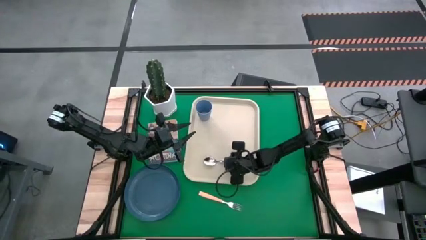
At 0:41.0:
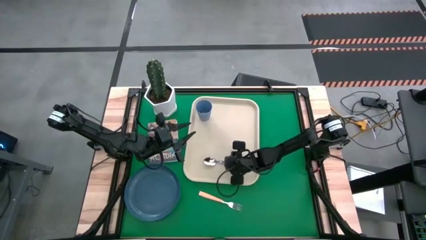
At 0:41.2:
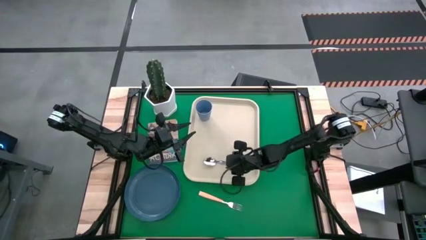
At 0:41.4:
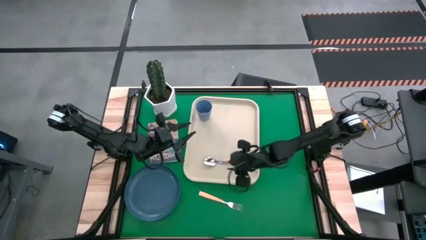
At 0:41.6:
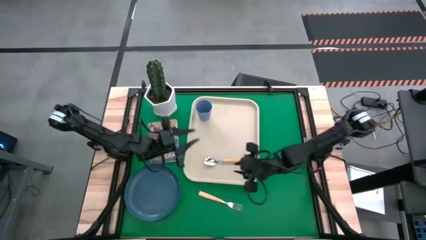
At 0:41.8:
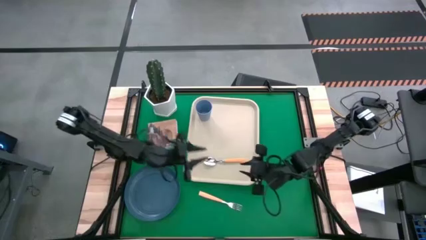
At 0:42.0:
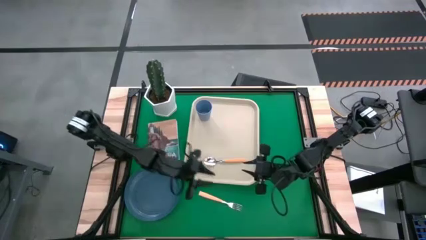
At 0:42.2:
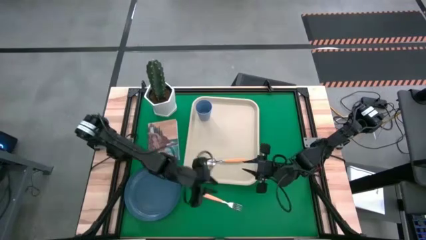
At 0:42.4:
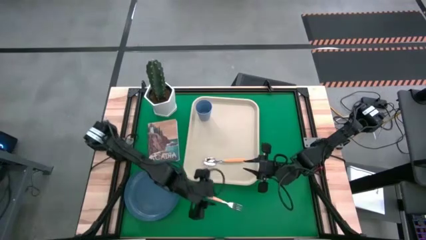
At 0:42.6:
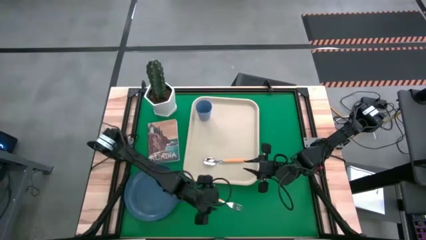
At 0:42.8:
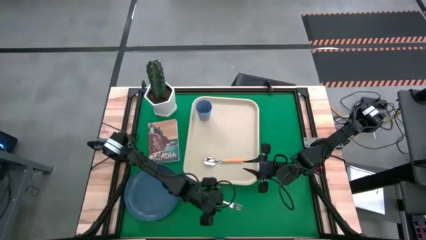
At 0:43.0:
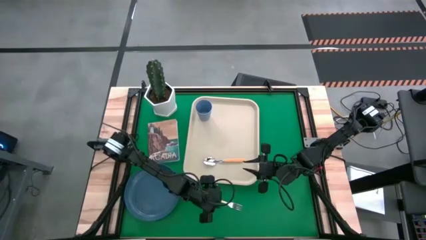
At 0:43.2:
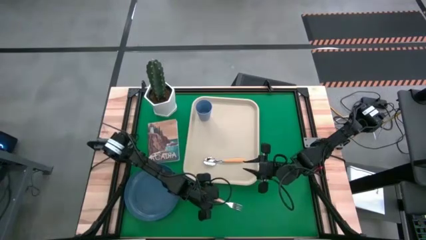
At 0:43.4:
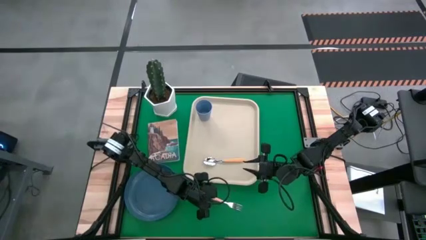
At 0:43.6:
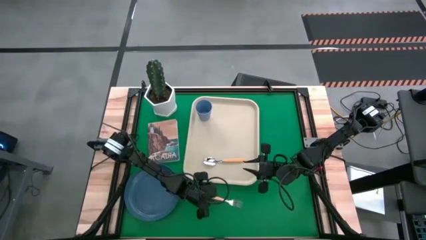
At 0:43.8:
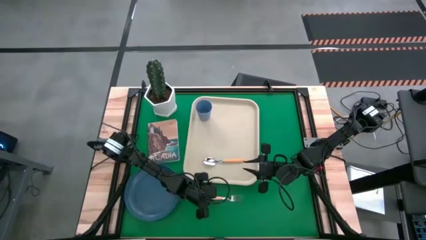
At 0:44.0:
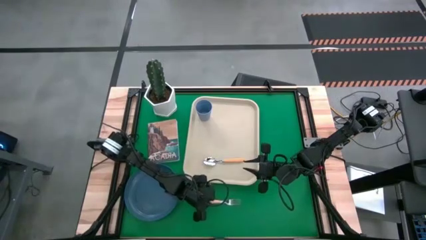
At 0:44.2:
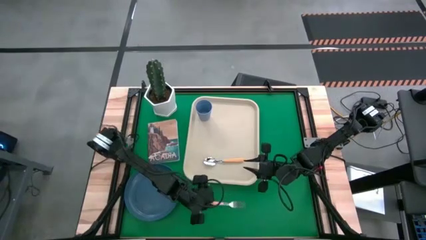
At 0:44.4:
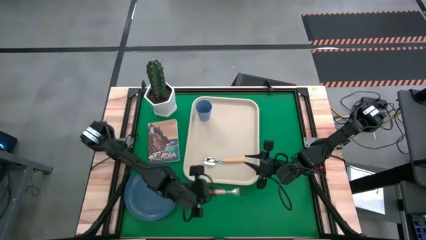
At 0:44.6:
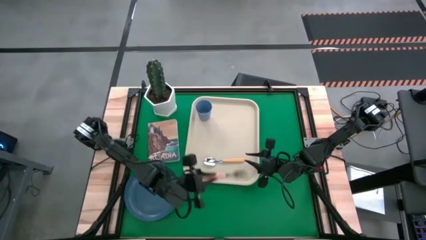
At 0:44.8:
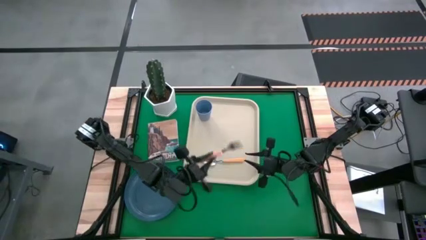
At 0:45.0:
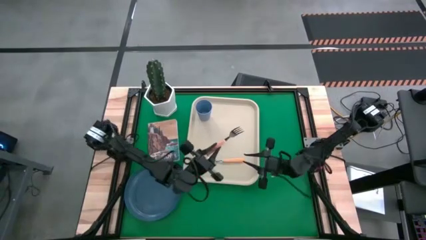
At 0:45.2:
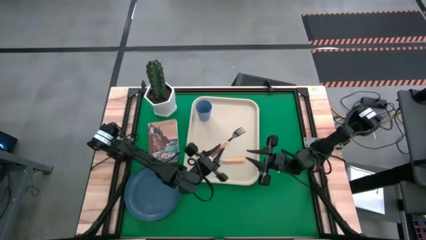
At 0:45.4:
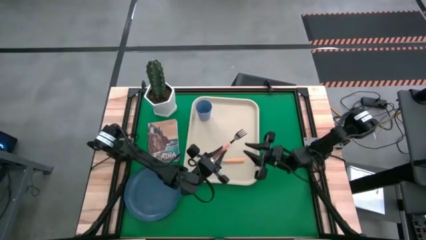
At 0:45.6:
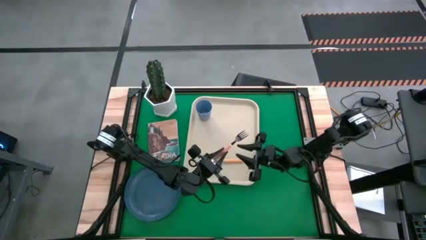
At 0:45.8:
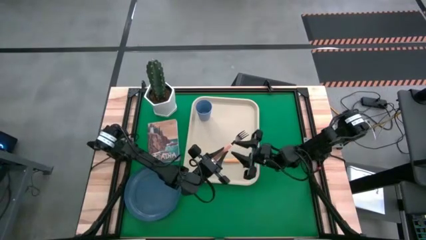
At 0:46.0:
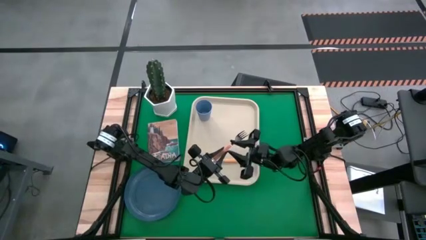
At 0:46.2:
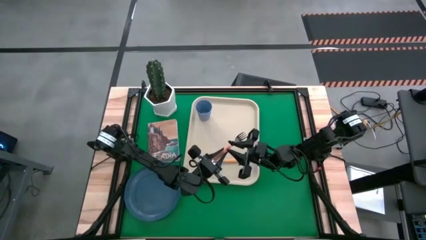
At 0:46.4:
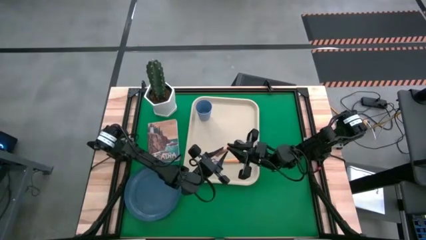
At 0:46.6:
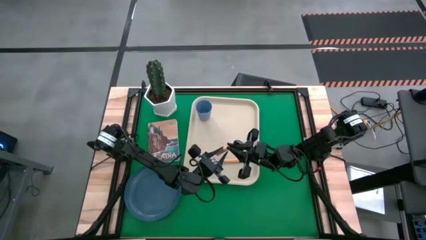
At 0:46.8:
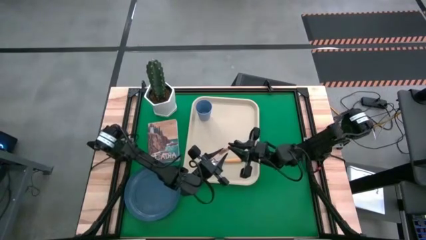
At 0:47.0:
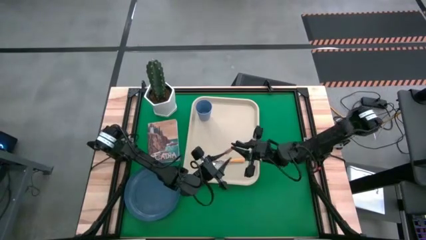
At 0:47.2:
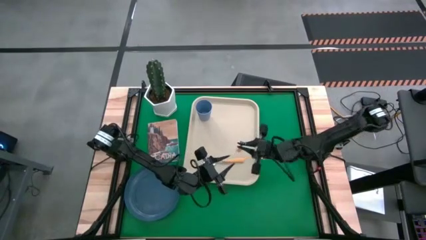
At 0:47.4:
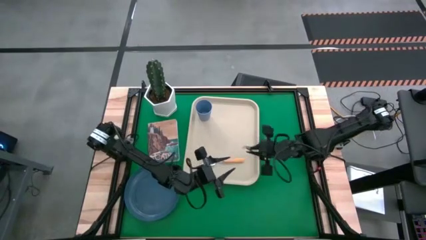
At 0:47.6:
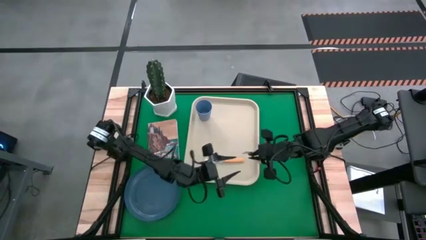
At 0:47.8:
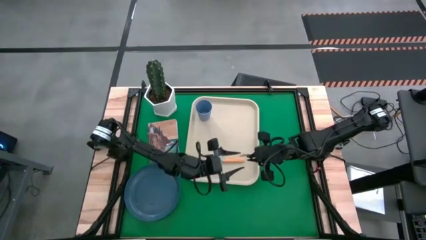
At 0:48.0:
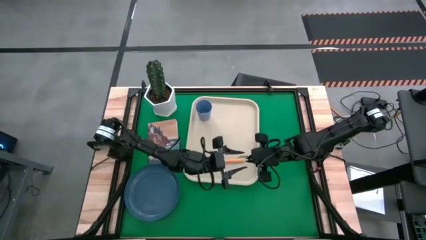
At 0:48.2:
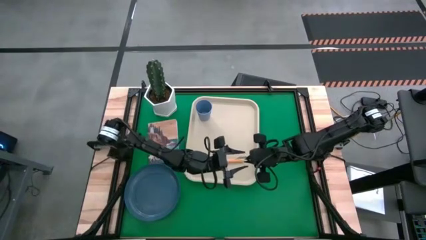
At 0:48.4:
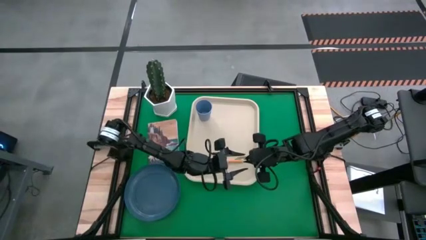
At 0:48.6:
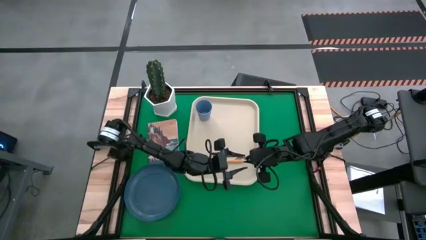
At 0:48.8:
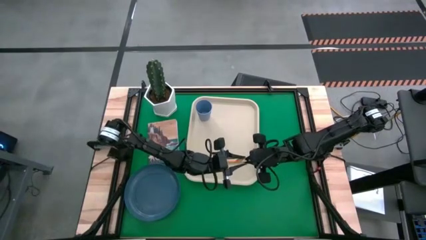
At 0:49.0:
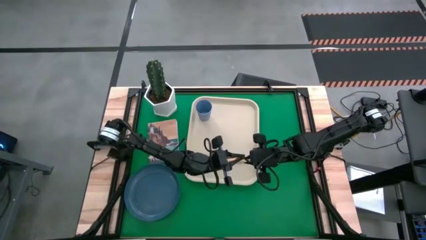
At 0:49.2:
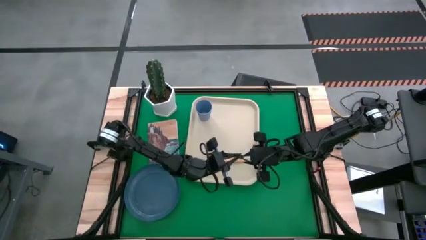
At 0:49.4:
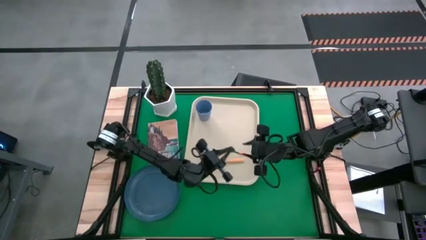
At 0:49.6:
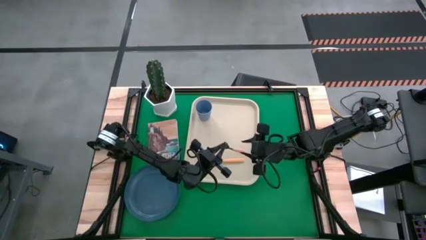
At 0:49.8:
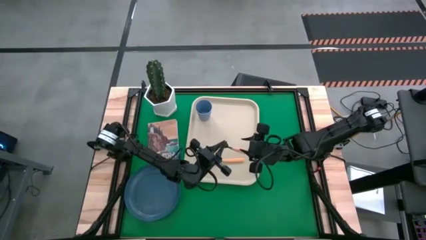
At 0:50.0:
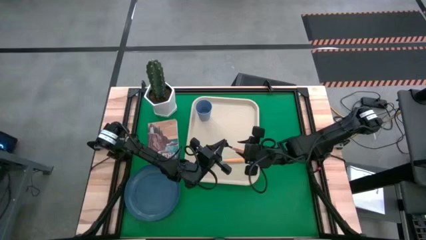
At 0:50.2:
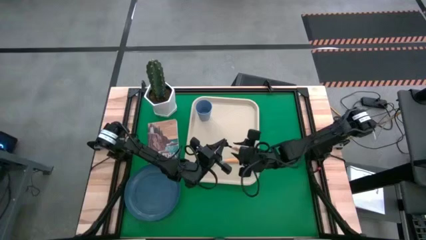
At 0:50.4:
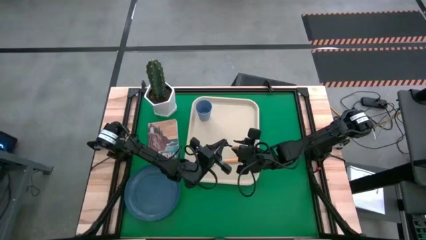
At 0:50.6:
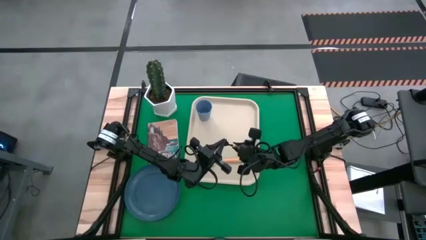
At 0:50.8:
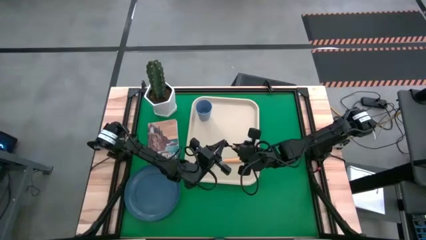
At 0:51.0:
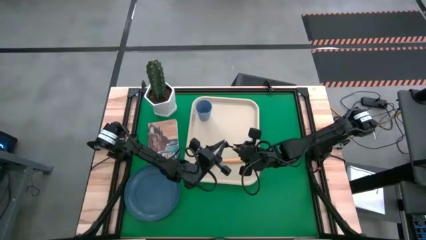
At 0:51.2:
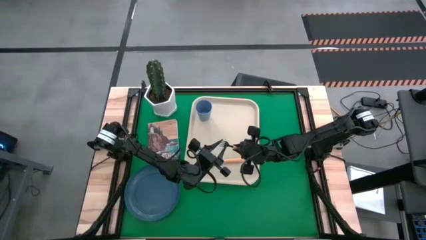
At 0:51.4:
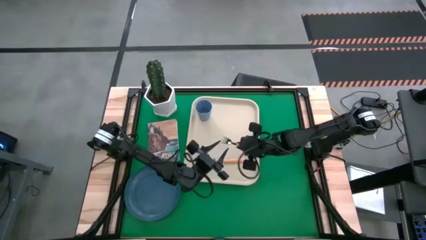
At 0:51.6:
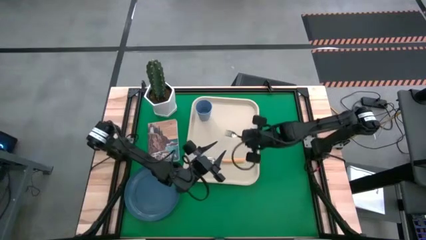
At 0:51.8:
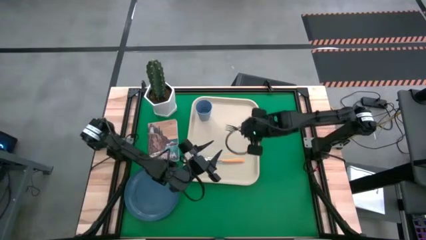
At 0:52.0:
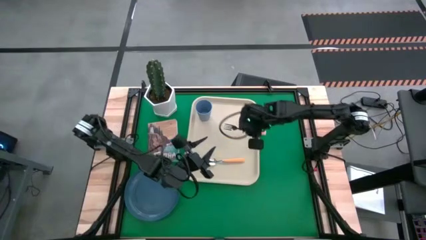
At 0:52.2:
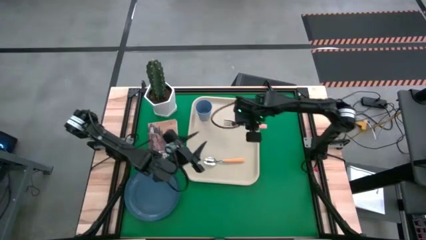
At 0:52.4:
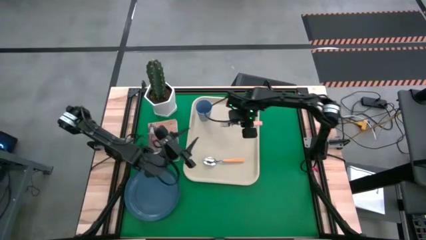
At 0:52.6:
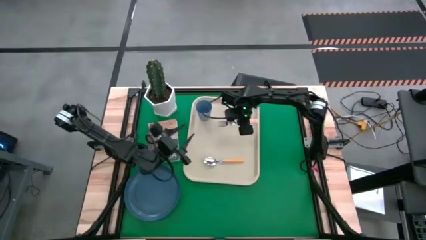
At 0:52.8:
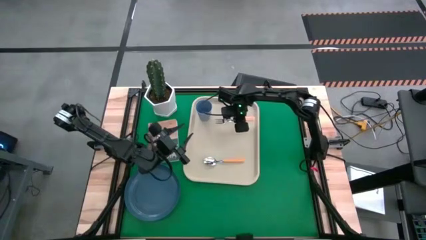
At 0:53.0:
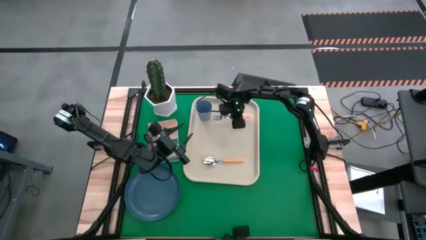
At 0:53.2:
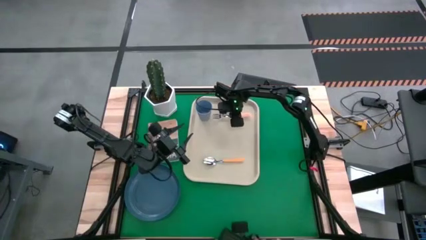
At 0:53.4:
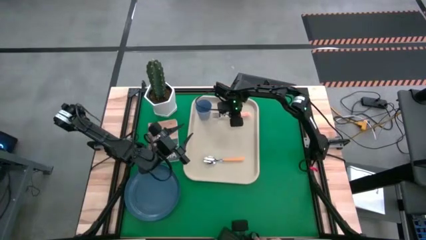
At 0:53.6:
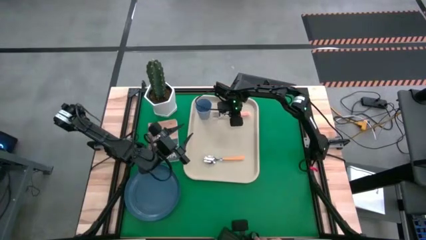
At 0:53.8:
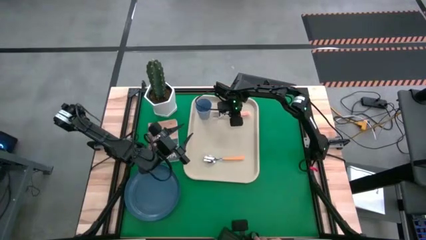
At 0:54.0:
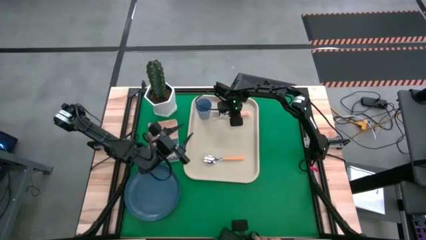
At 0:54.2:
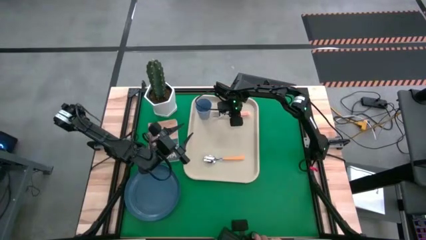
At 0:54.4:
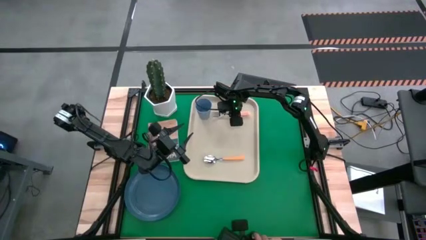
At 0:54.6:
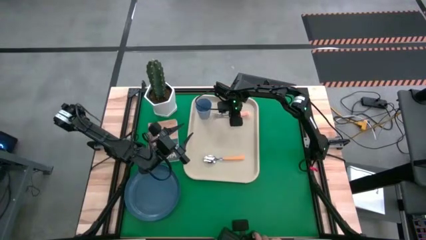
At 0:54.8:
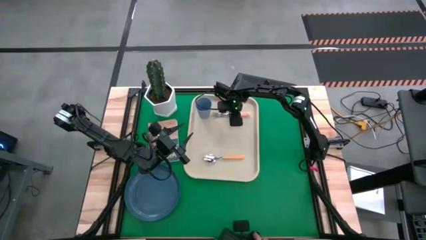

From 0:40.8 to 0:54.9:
Task: Pick and place plate/cup/fork/spoon on tray
Put the light orange fork on the white tray to the bottom of the blue cup
